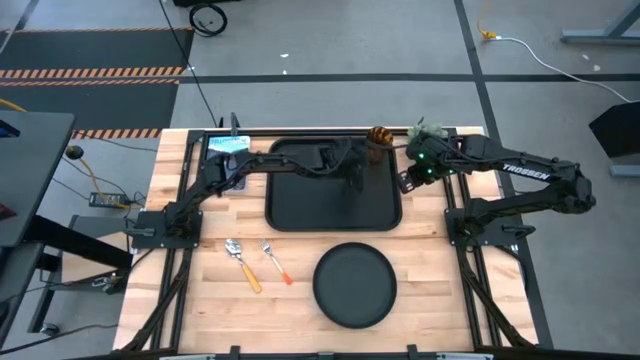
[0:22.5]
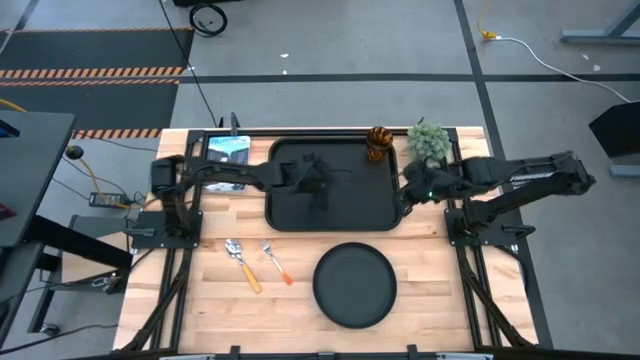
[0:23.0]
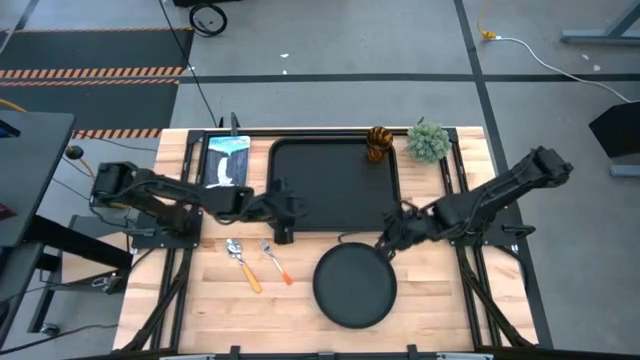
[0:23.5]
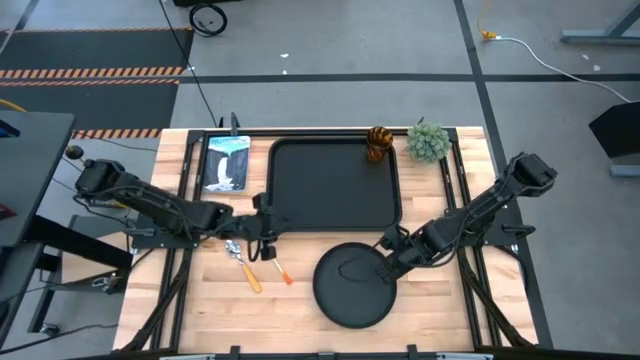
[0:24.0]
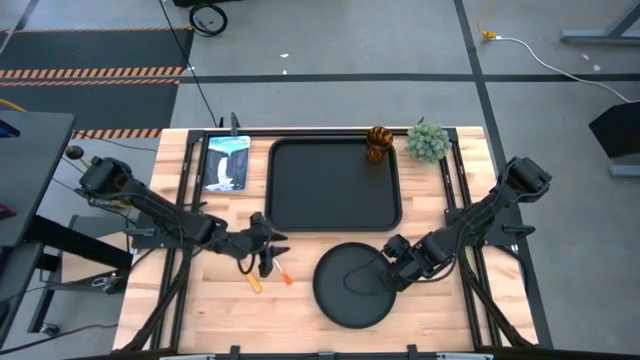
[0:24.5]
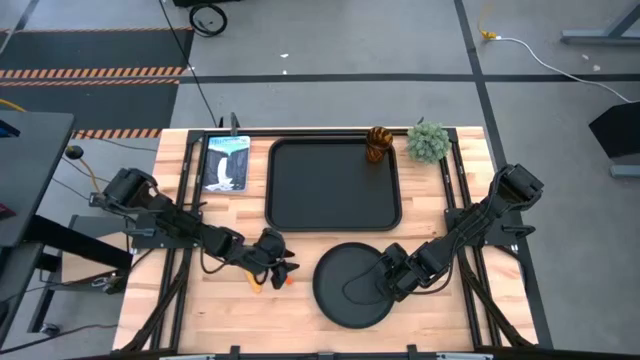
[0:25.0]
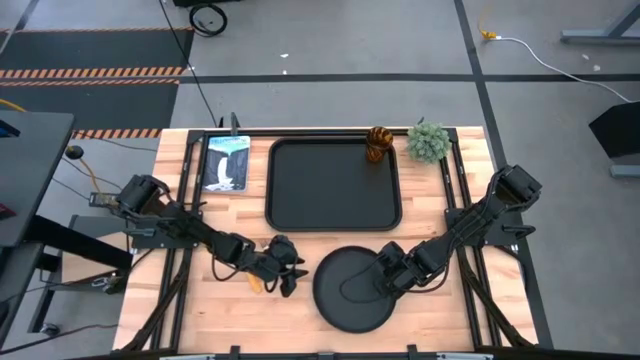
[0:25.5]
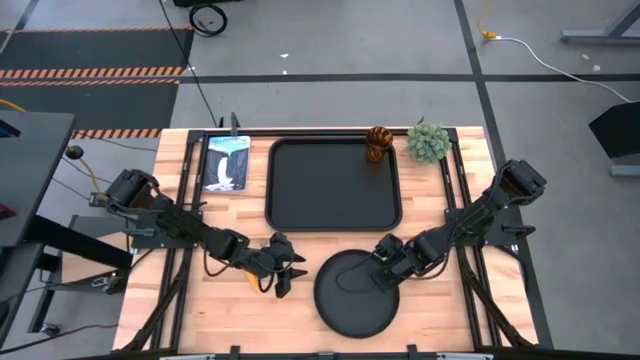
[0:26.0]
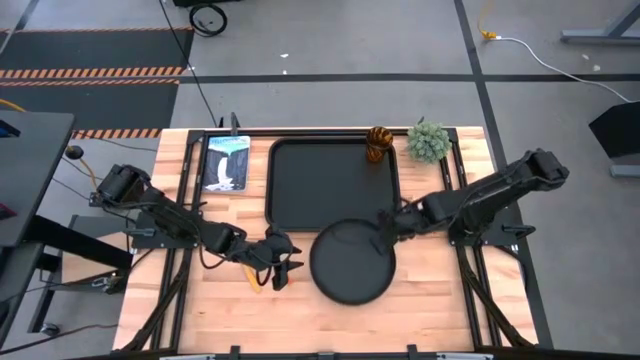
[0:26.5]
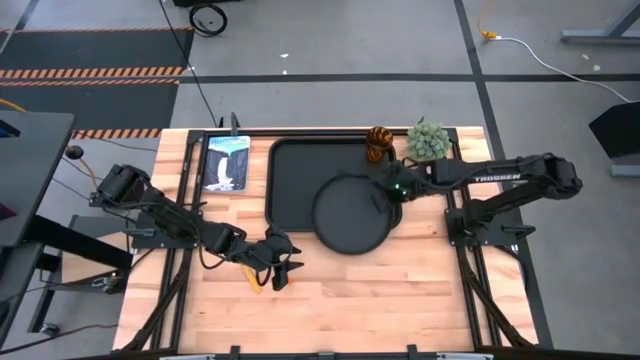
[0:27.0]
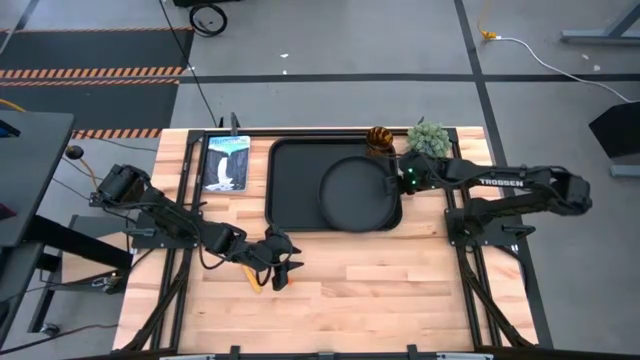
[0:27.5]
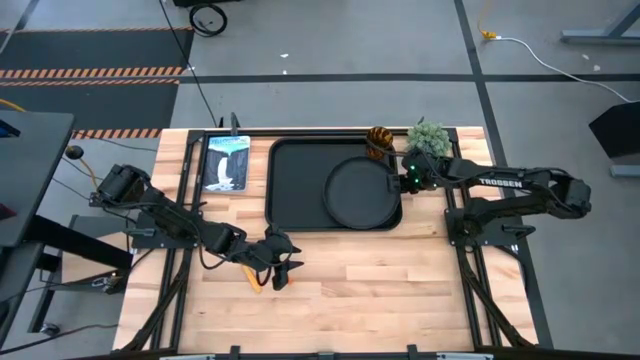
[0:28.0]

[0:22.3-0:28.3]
Task: Pick and place plate/cup/fork/spoon on tray
Put the black plate on the black tray to the bottom left of the orange cup

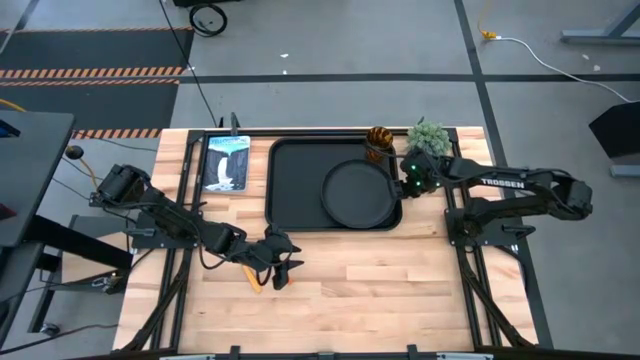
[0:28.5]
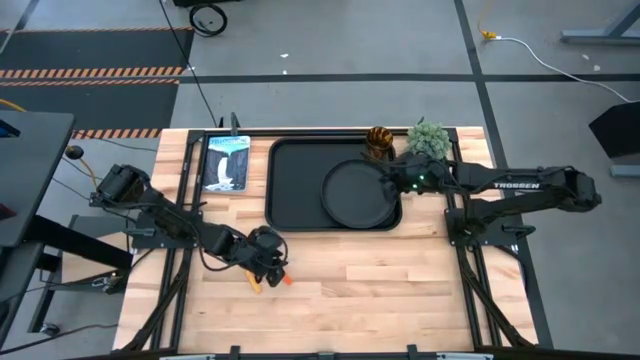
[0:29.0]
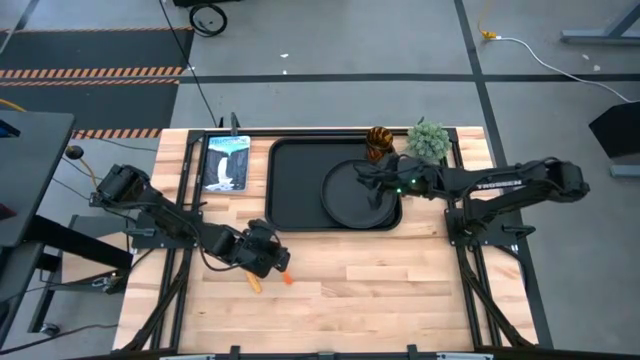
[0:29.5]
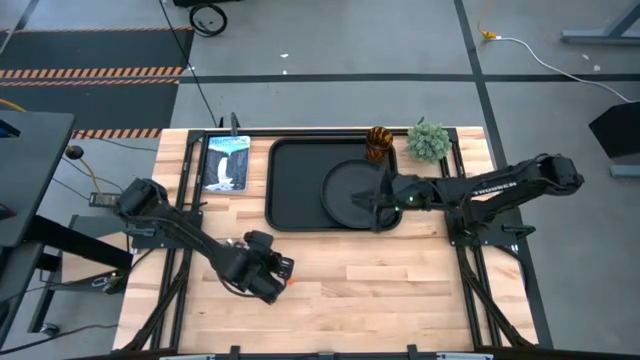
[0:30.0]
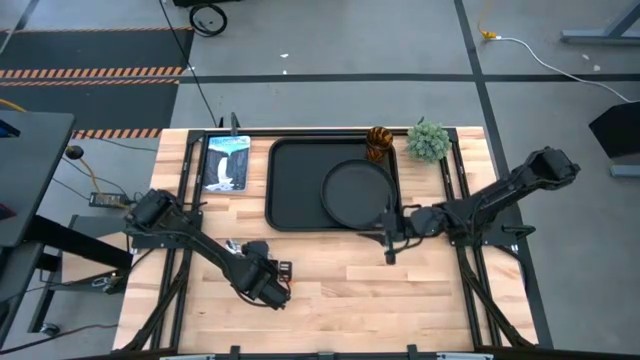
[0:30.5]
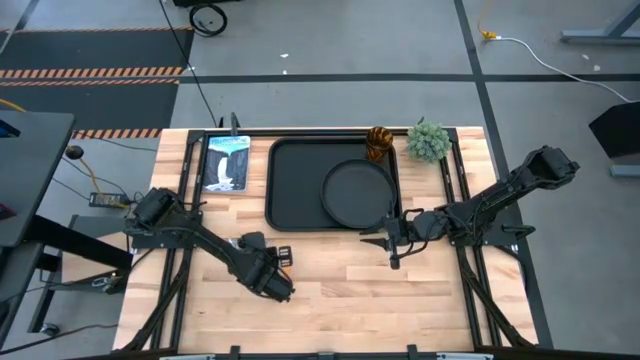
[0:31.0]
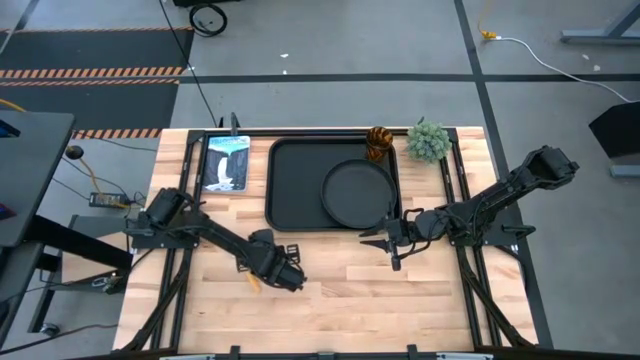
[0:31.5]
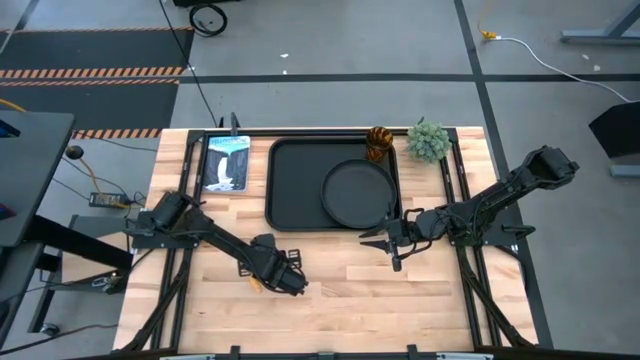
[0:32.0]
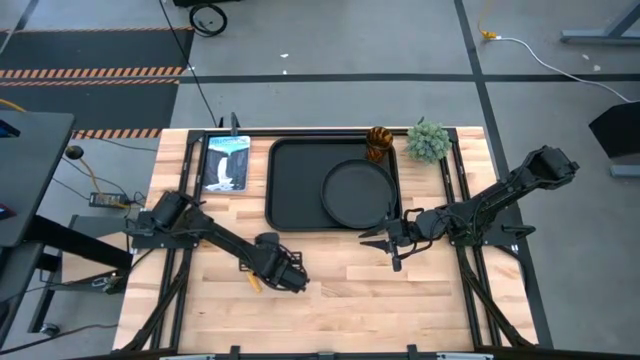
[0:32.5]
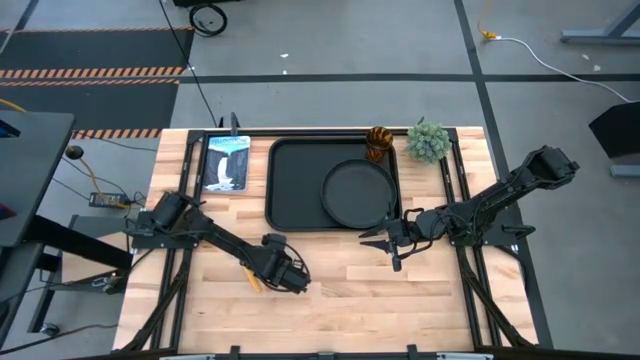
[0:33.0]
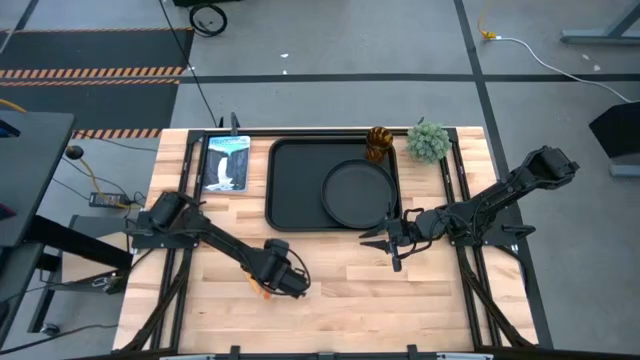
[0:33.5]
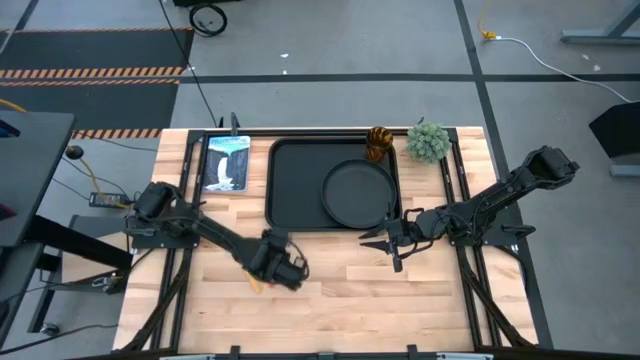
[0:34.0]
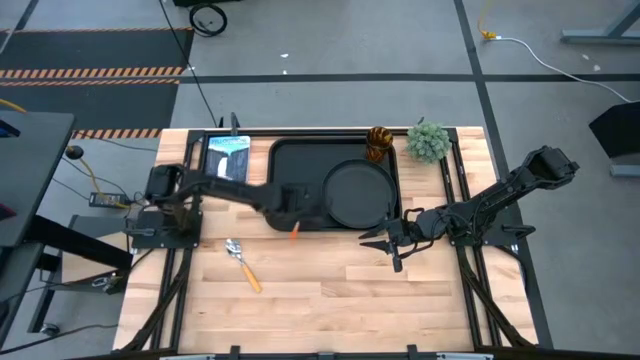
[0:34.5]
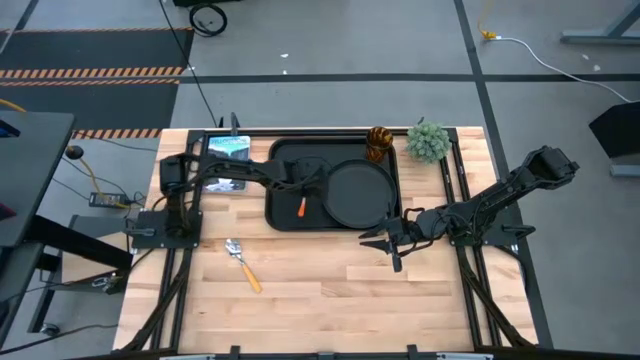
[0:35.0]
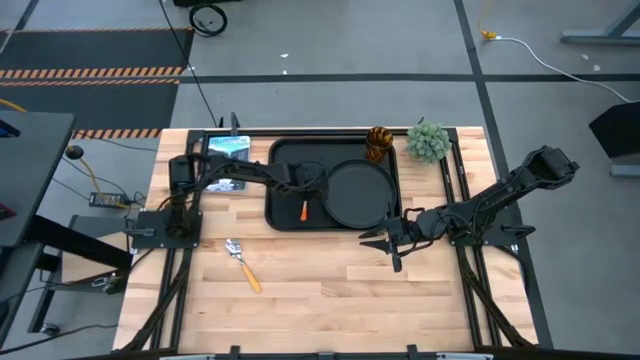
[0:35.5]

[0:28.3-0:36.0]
Put the orange fork on the black tray to the left of the black plate

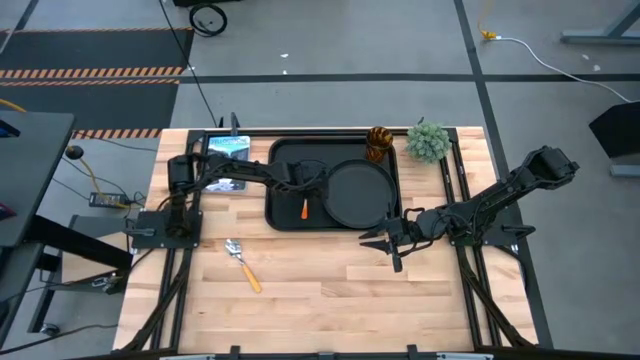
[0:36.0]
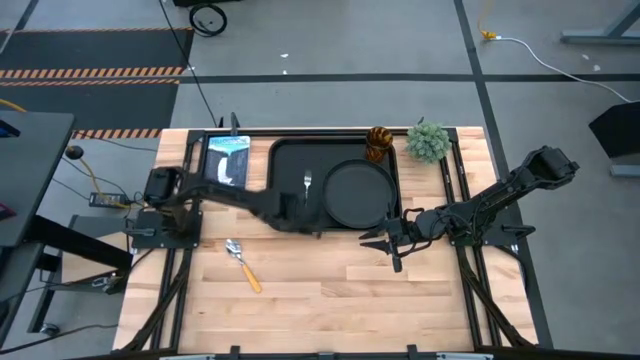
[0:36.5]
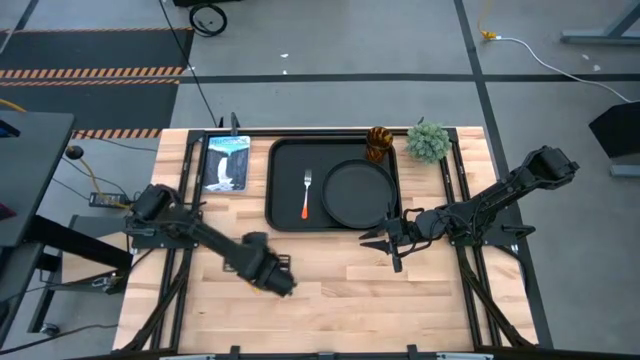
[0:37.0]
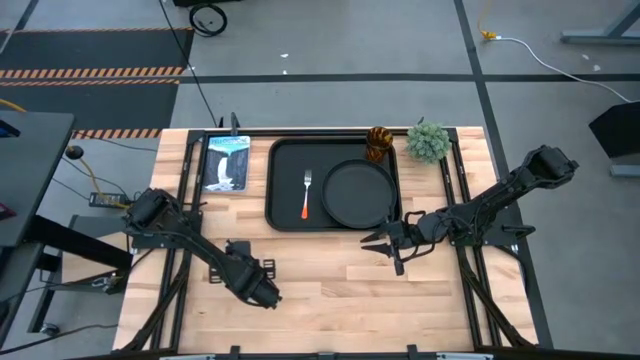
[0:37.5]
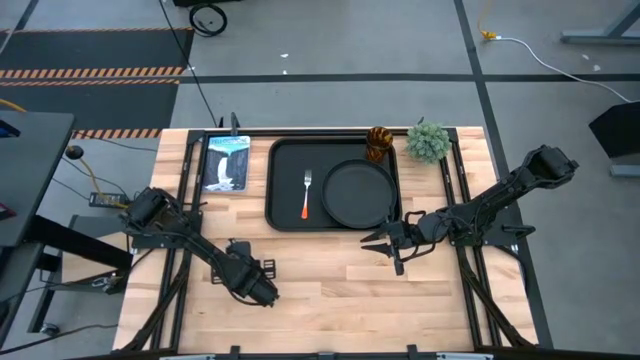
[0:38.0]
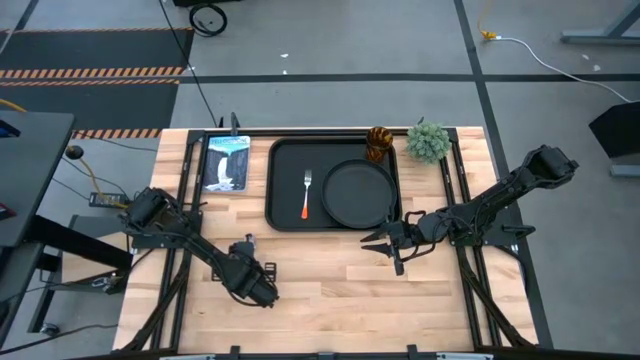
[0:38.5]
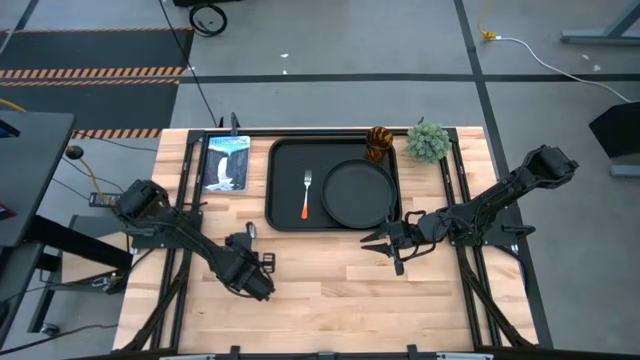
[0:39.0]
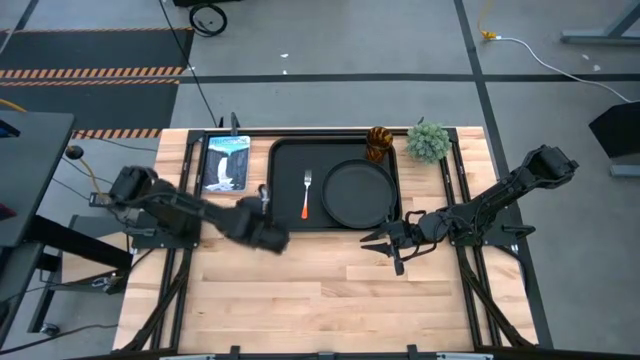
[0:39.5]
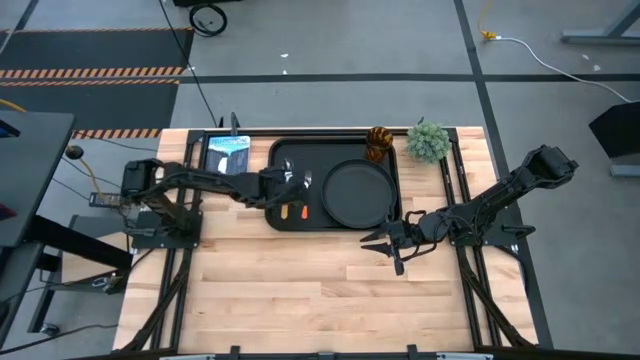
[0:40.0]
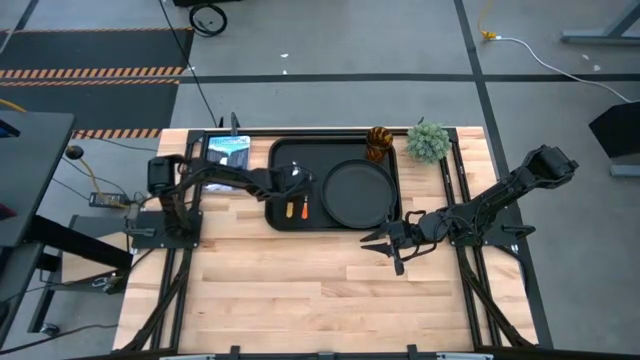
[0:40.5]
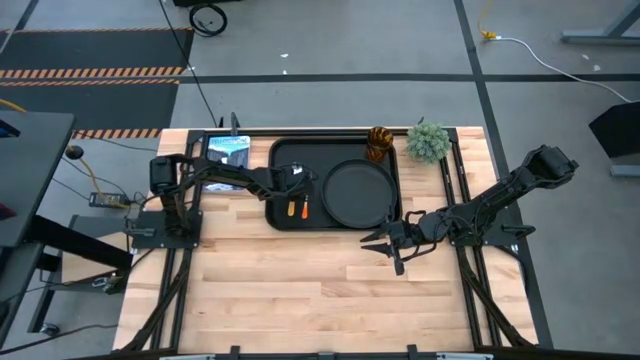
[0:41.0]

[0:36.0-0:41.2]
Put the yellow spoon on the black tray to the left of the orange fork

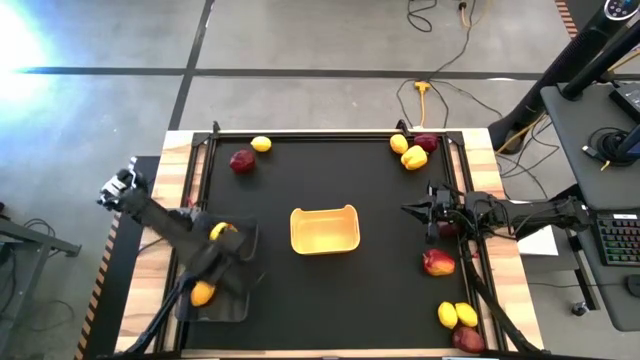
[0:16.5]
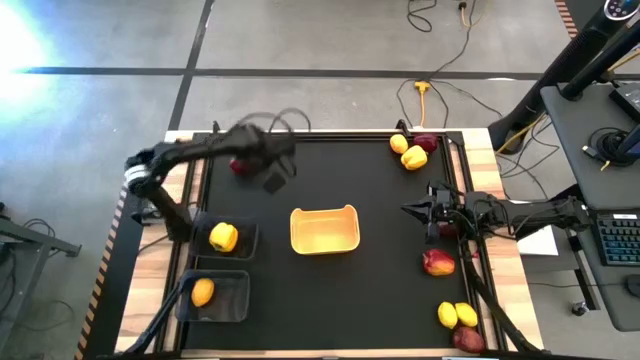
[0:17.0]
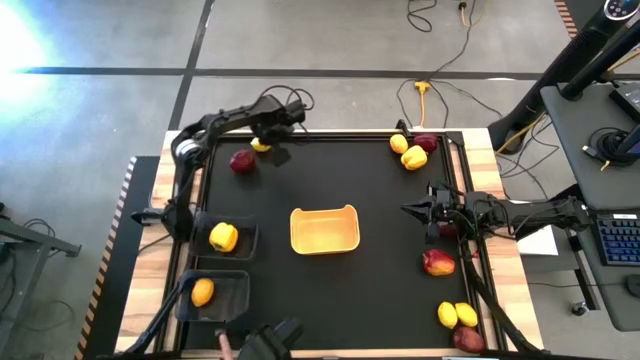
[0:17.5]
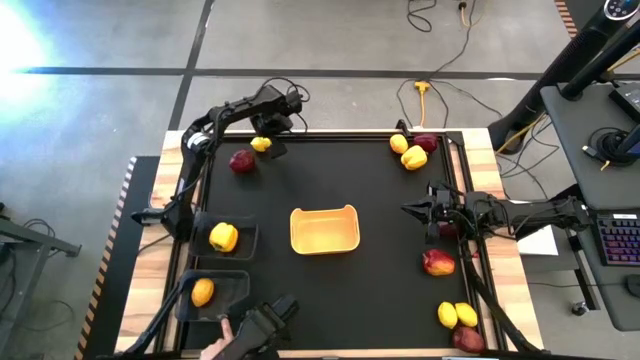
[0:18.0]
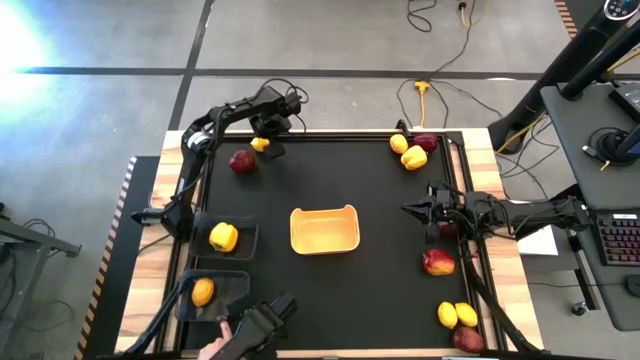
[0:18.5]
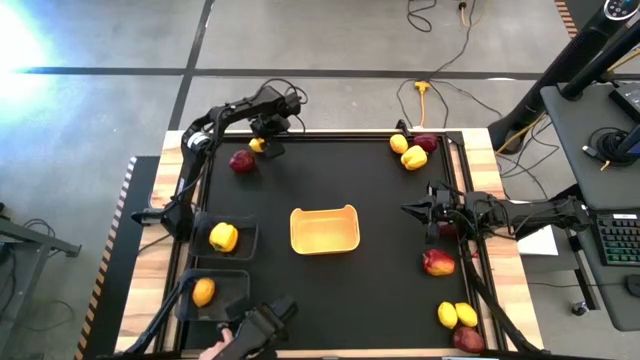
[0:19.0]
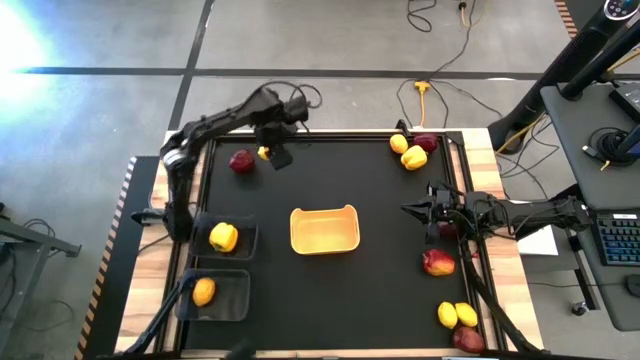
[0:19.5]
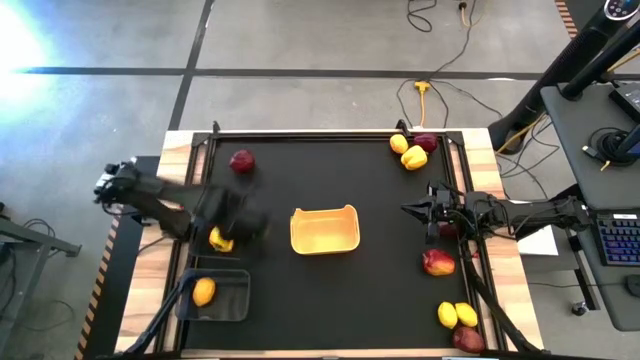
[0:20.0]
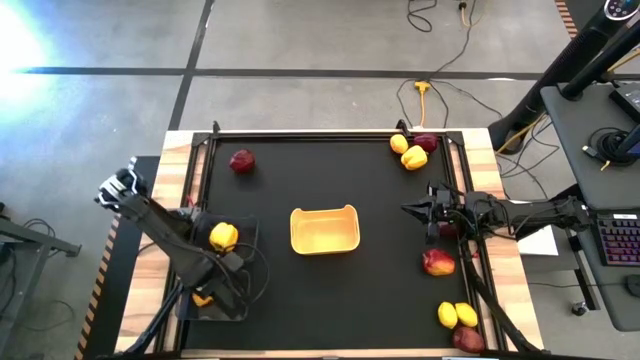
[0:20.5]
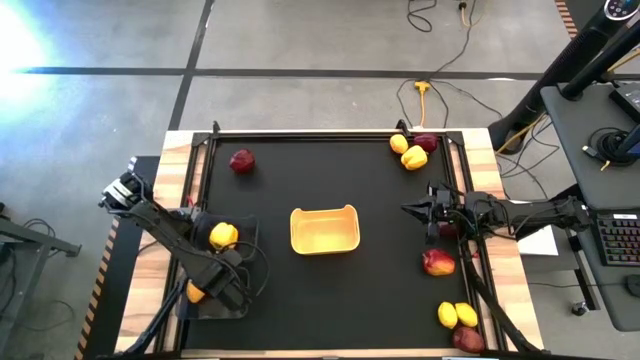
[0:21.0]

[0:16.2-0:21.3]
Task: Sort produce into baskets
Put the yellow lemon into the bottom black transparent bin
